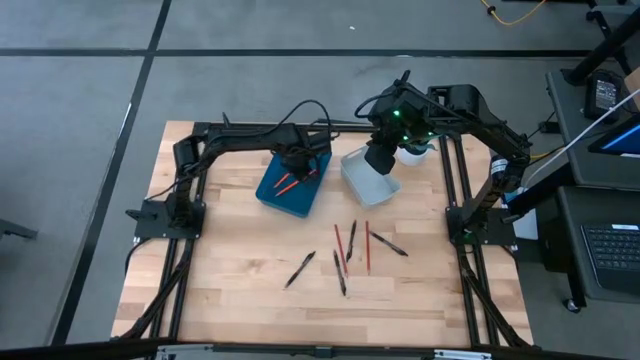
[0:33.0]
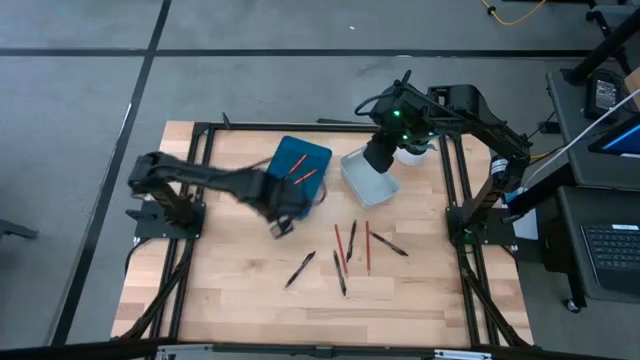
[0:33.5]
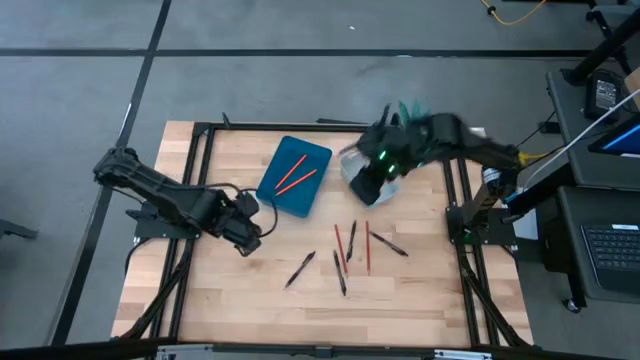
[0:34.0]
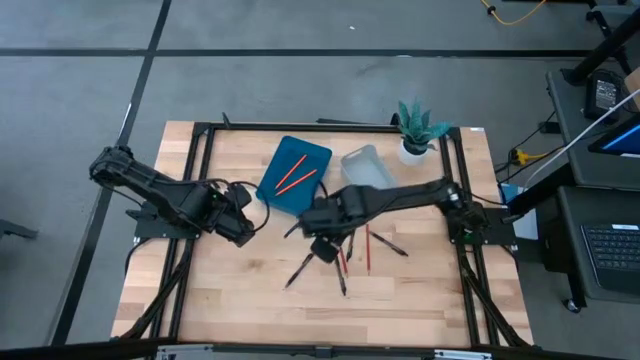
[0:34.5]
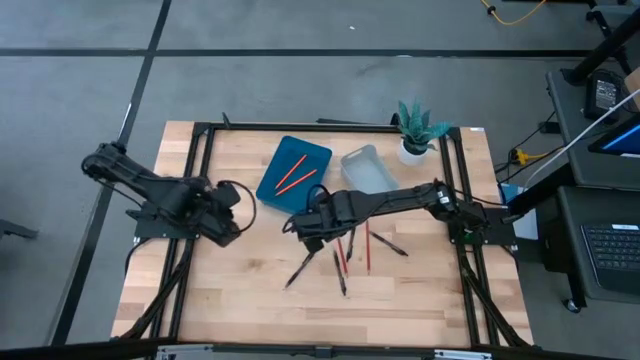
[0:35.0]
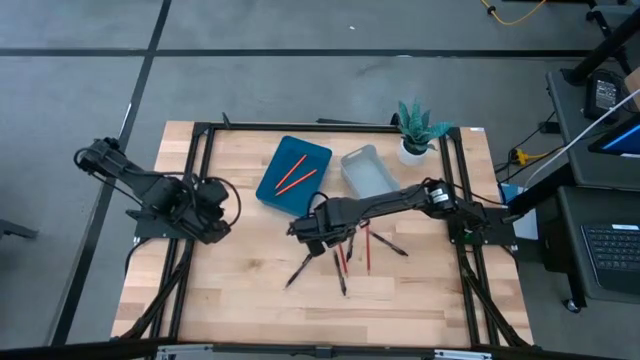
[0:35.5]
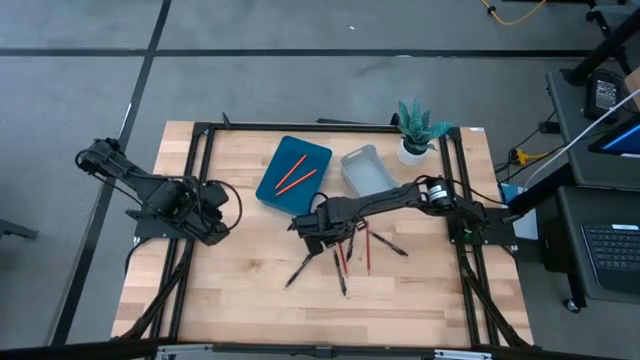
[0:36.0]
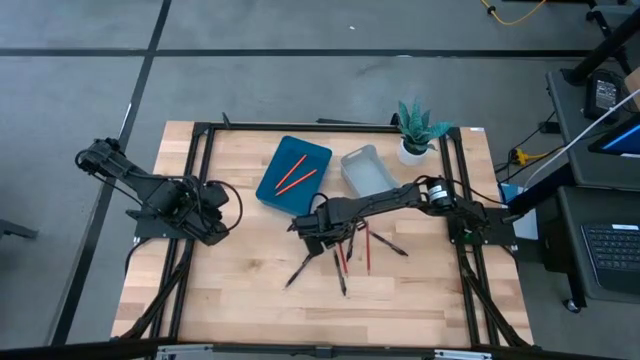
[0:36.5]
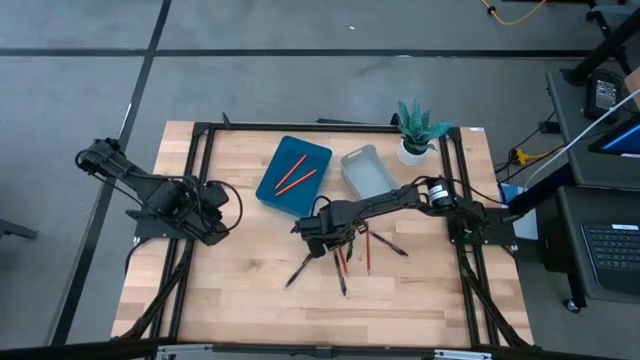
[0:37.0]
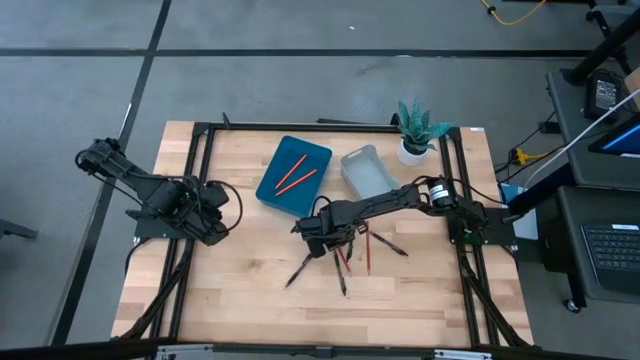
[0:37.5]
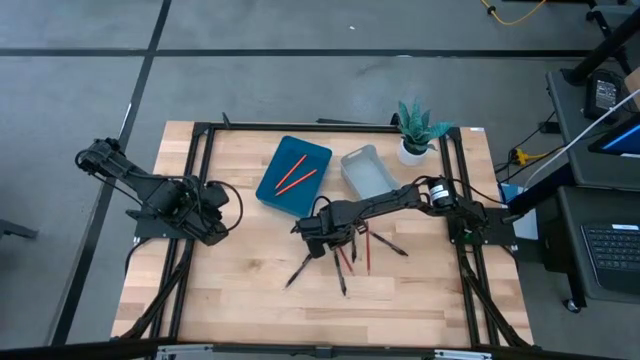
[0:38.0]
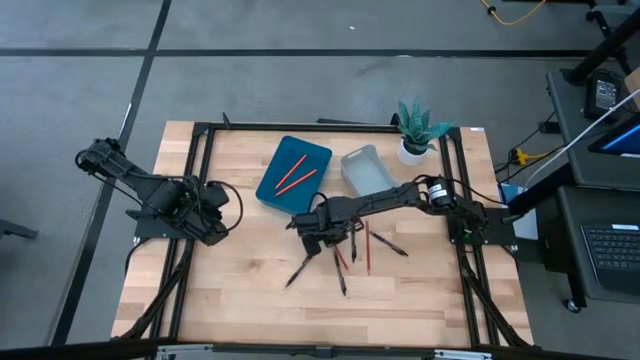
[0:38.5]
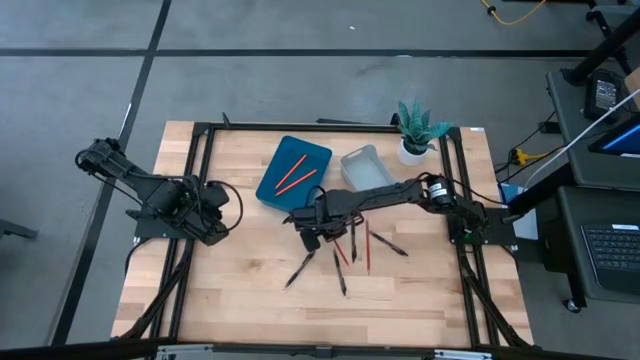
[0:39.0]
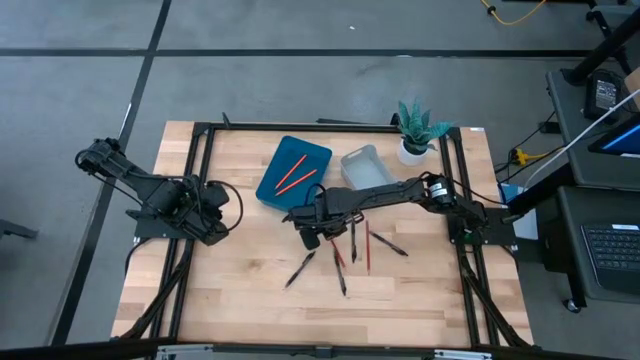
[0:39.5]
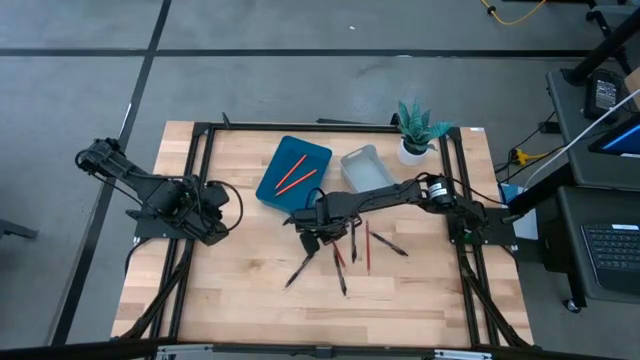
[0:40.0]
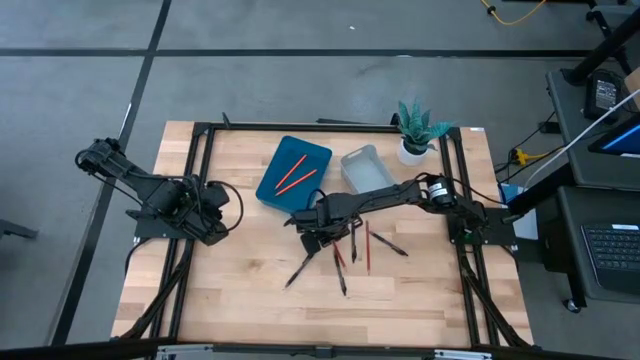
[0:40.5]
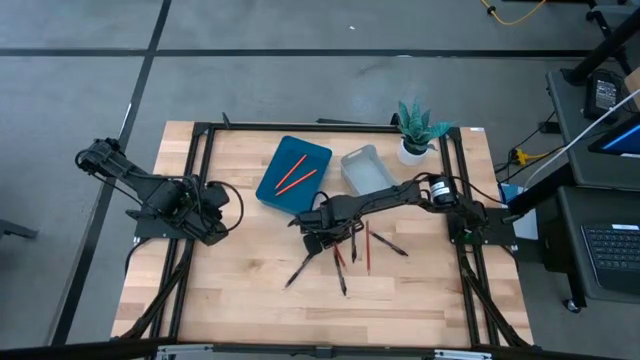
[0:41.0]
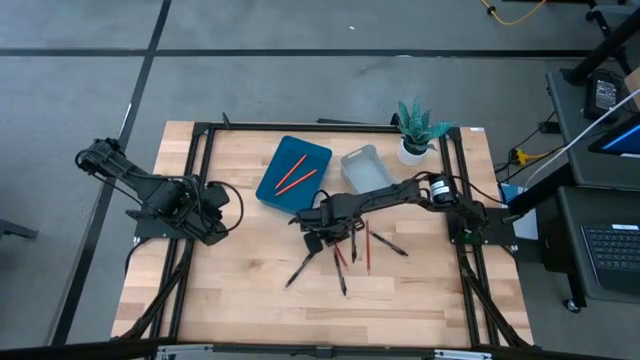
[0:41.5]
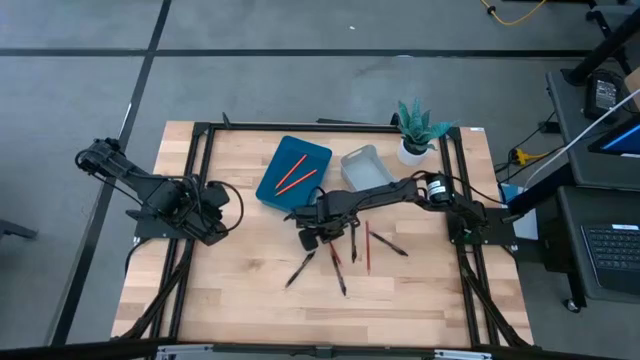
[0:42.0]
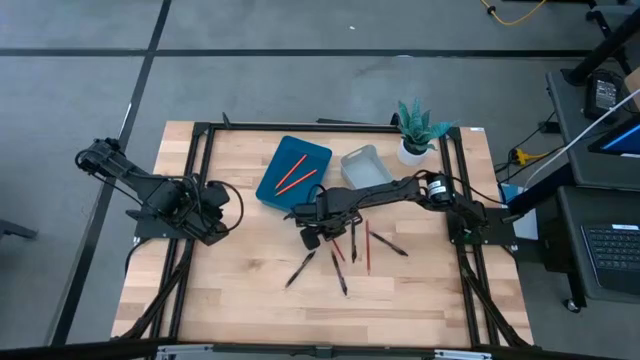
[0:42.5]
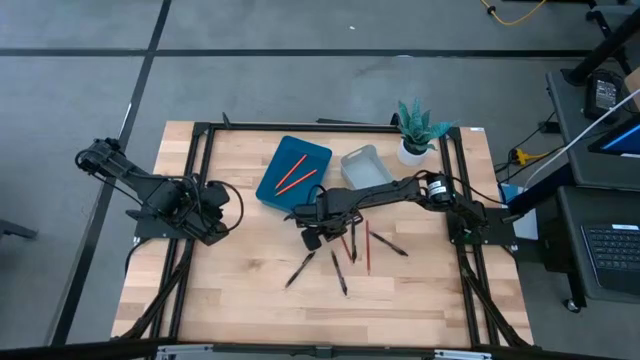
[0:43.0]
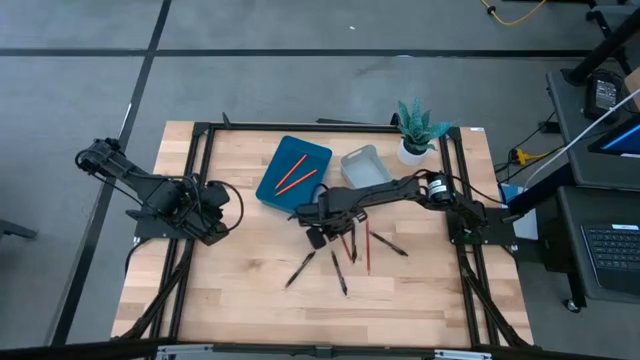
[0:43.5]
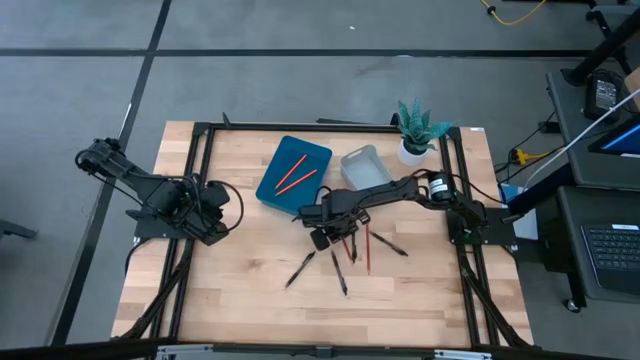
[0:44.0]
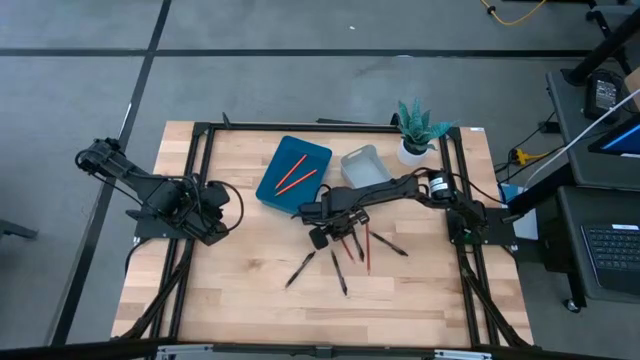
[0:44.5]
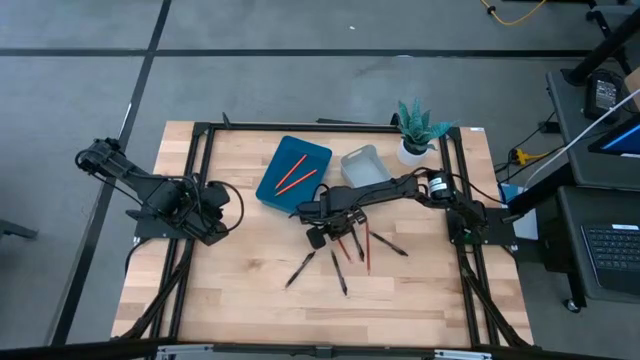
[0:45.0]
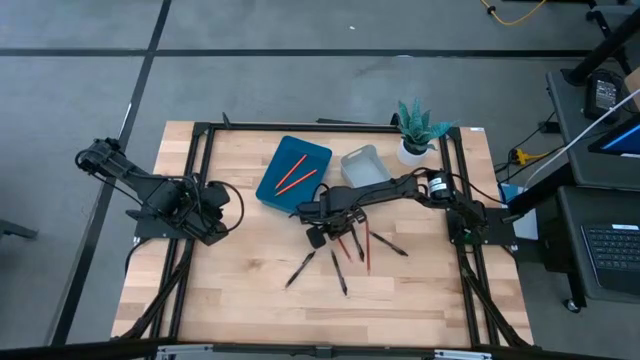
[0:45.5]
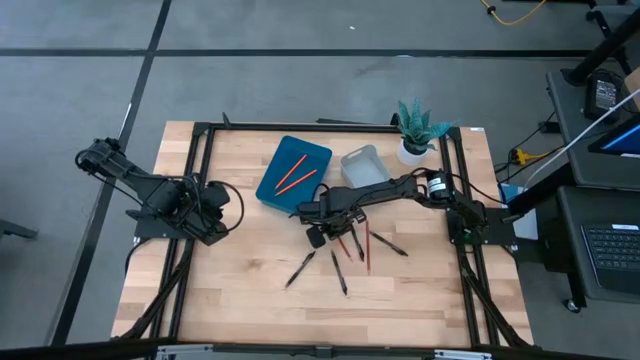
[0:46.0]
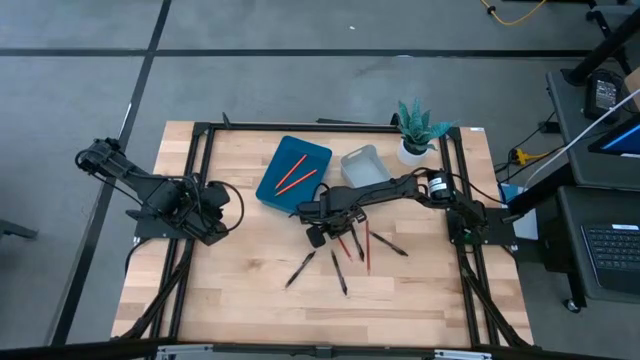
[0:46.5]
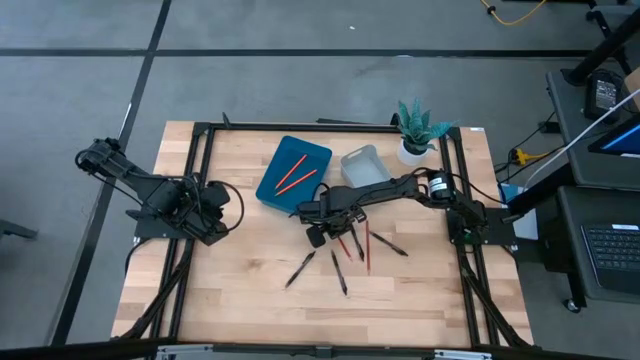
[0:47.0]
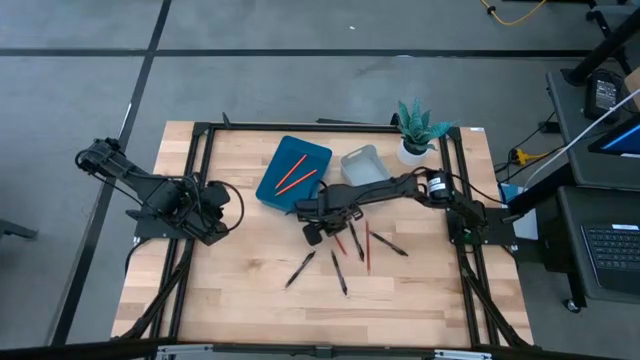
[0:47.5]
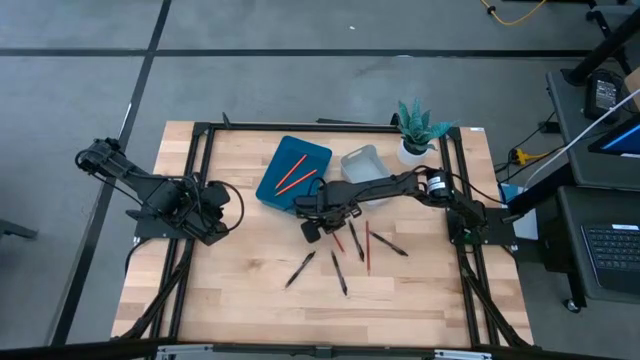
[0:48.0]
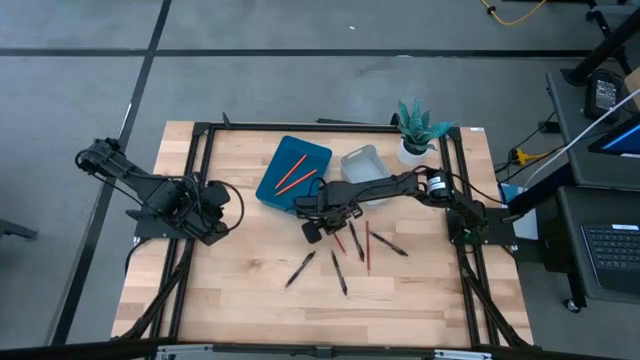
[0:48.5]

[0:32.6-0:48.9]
Task: Sort pens & pencils
Put the red pencil into the blue bin

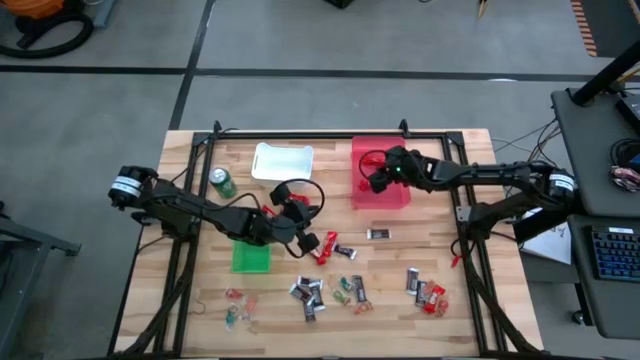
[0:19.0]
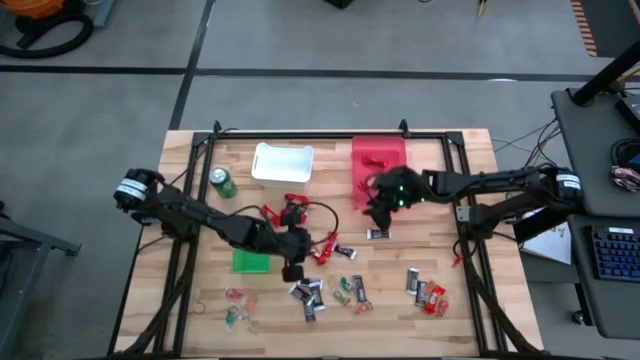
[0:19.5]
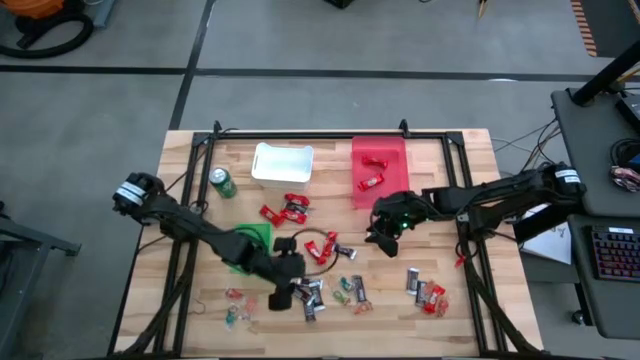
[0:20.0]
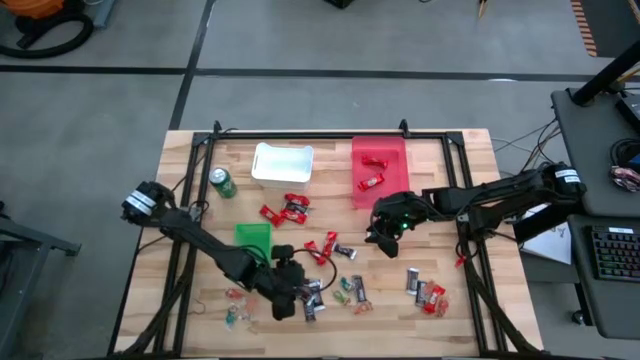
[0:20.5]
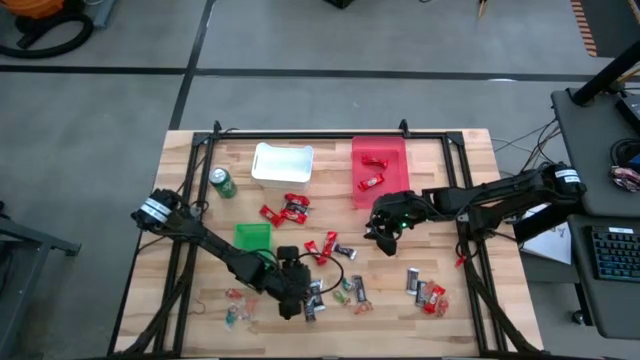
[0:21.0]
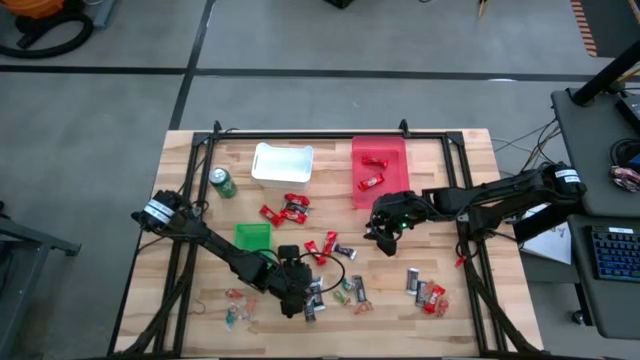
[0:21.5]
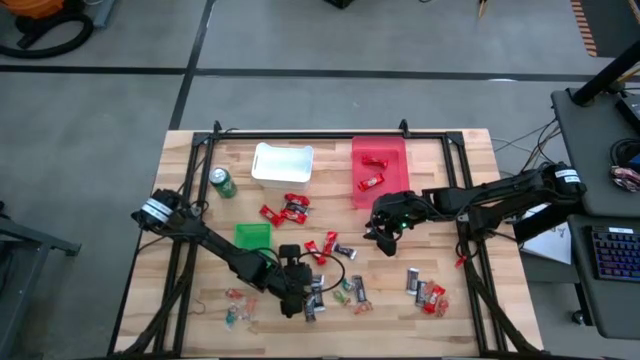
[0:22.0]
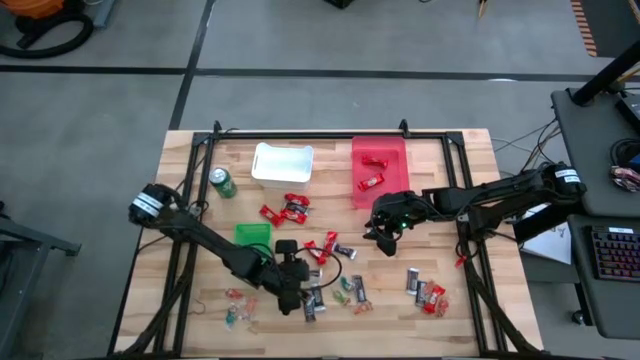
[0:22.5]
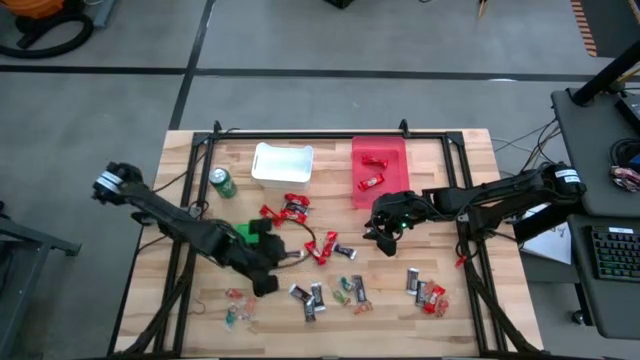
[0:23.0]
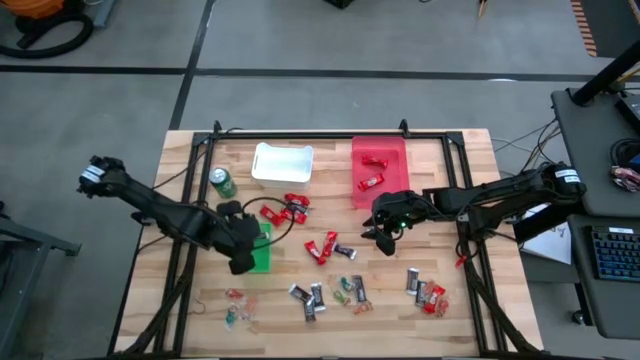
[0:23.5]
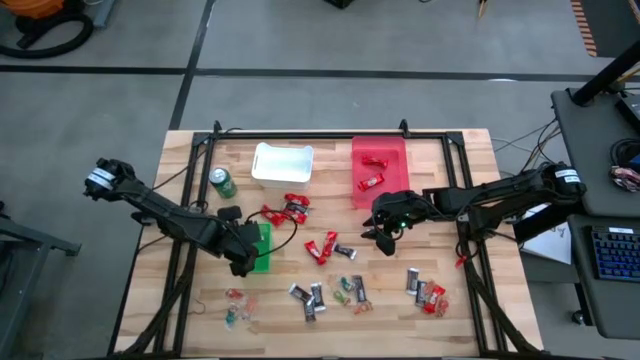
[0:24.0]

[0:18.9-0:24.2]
Task: Organize candy in baskets
Put the brown chocolate into the green basket

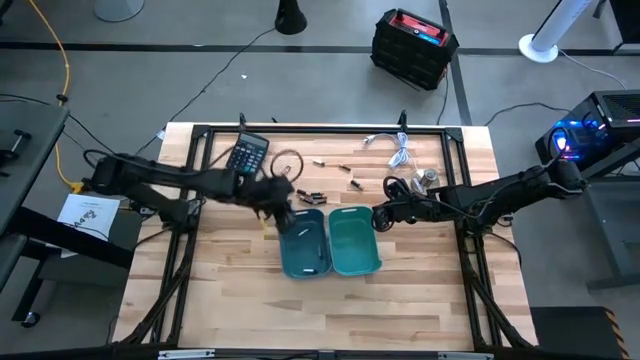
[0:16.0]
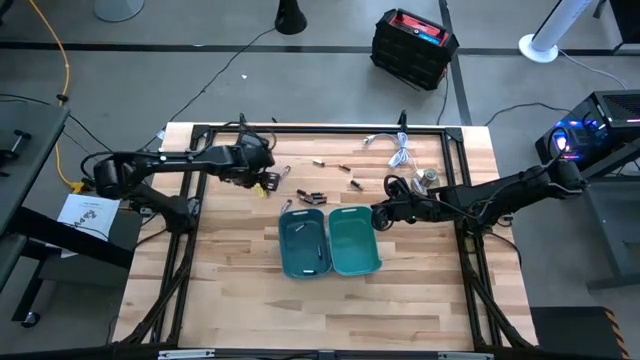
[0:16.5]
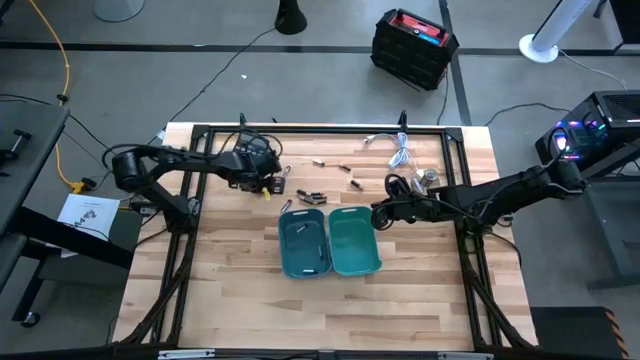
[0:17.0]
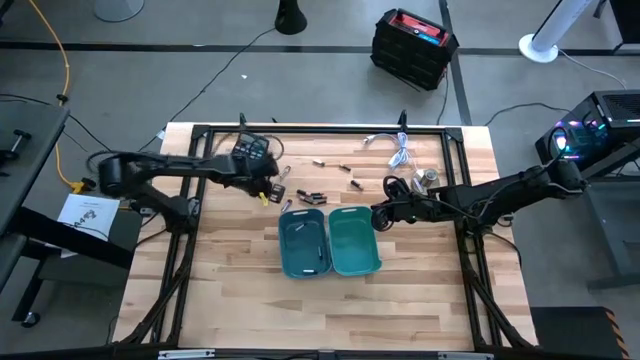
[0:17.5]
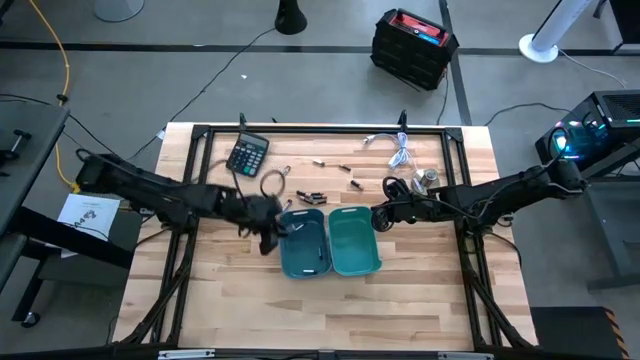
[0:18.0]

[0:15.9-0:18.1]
Task: Sort batteries
Put the silver battery into the blue bin
